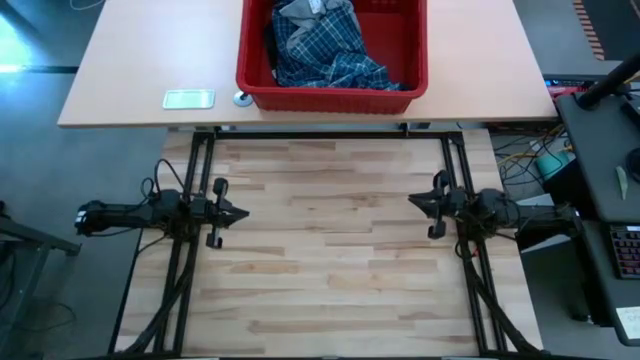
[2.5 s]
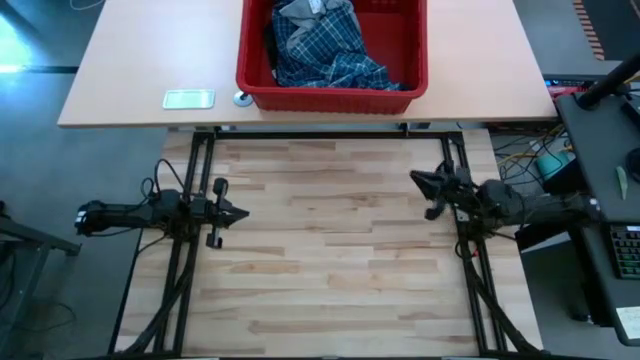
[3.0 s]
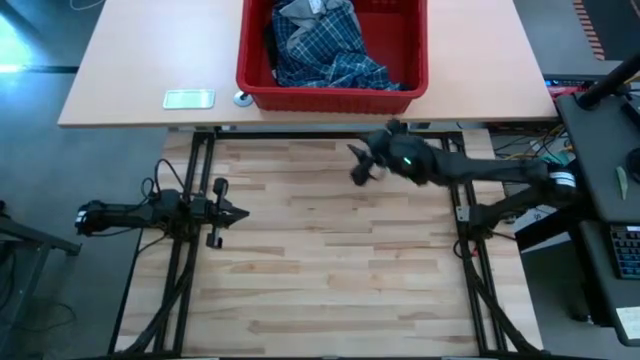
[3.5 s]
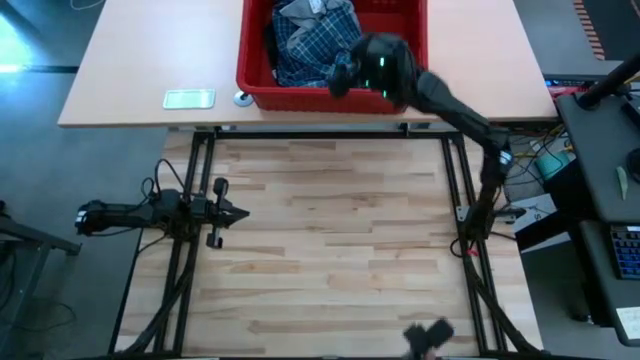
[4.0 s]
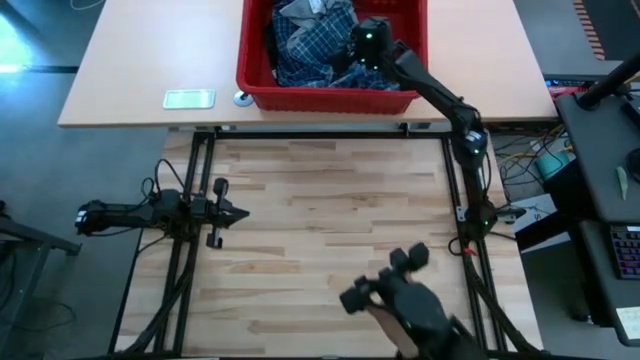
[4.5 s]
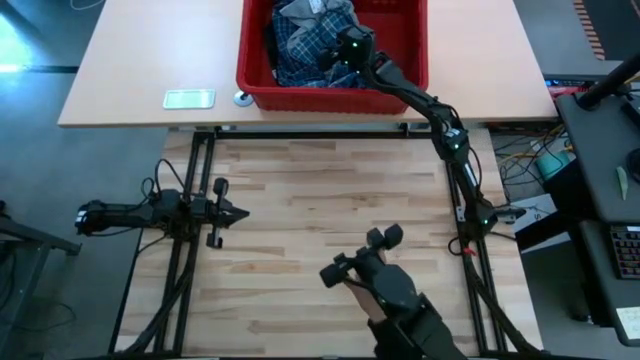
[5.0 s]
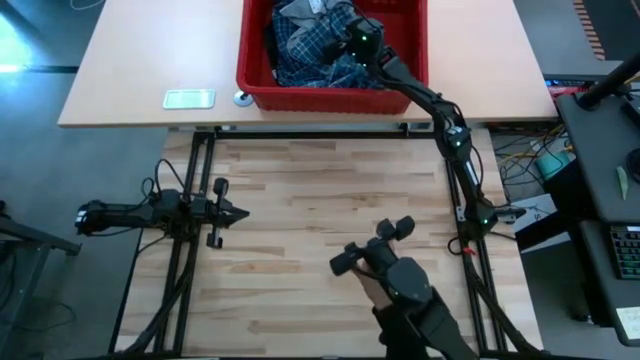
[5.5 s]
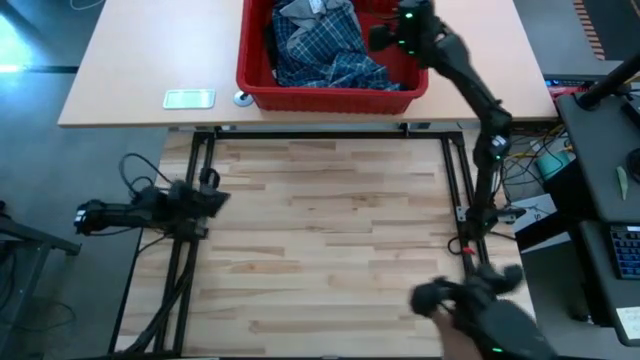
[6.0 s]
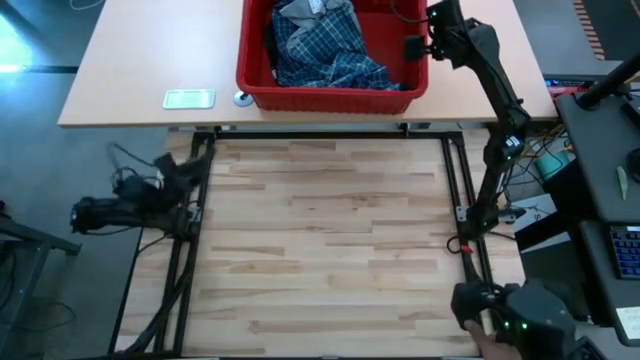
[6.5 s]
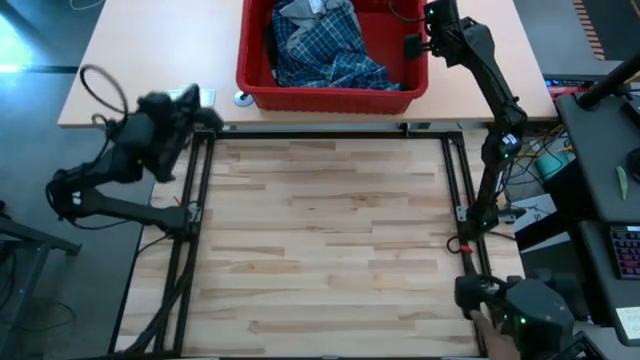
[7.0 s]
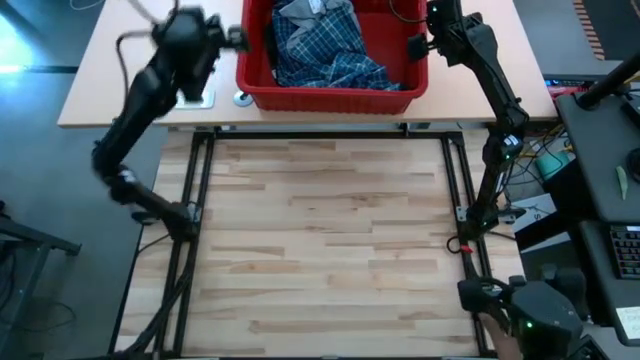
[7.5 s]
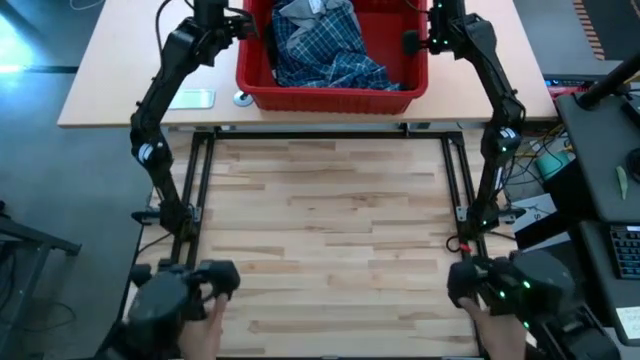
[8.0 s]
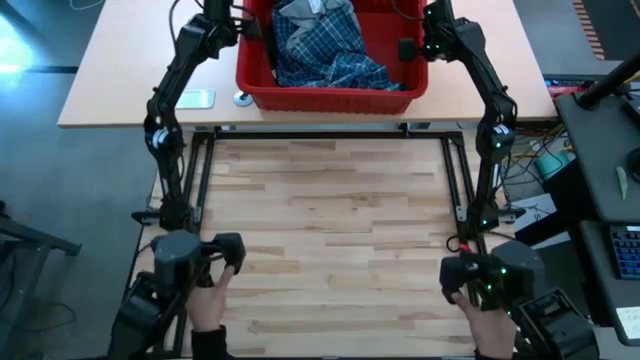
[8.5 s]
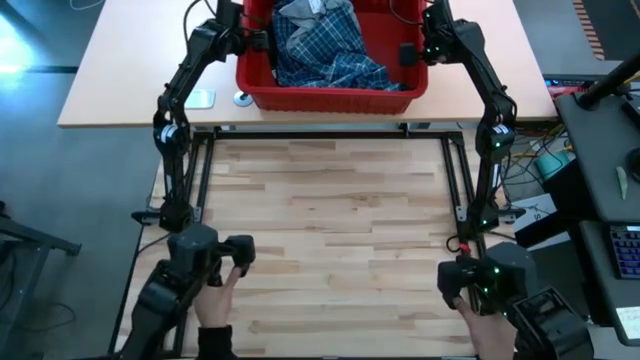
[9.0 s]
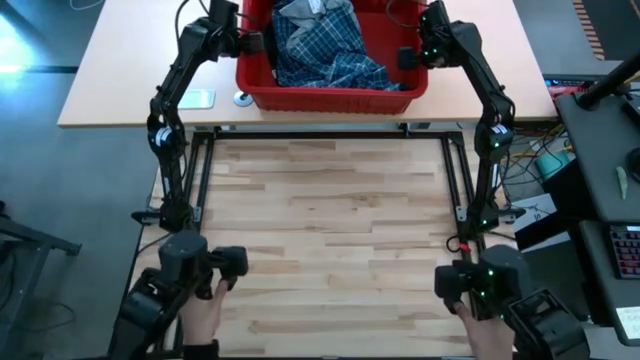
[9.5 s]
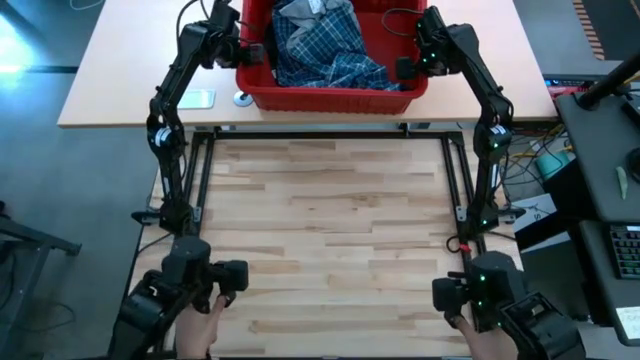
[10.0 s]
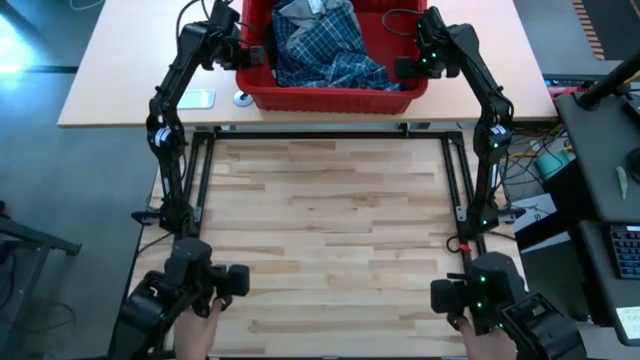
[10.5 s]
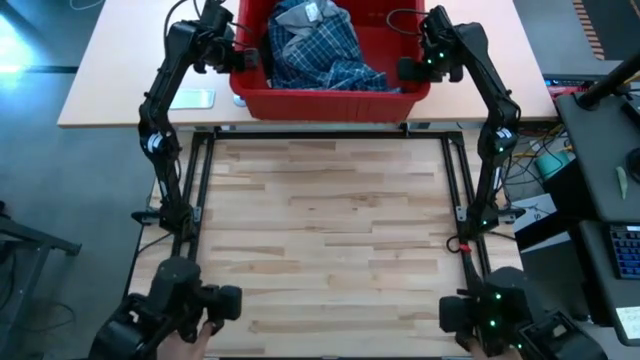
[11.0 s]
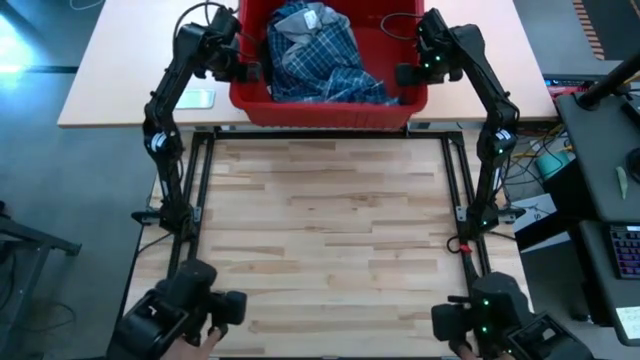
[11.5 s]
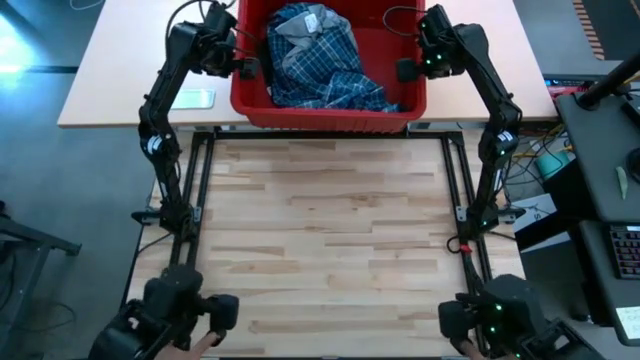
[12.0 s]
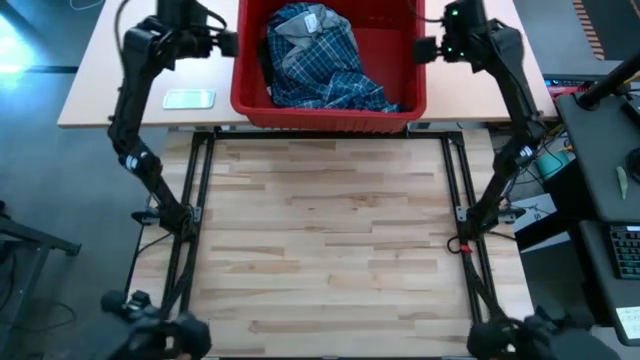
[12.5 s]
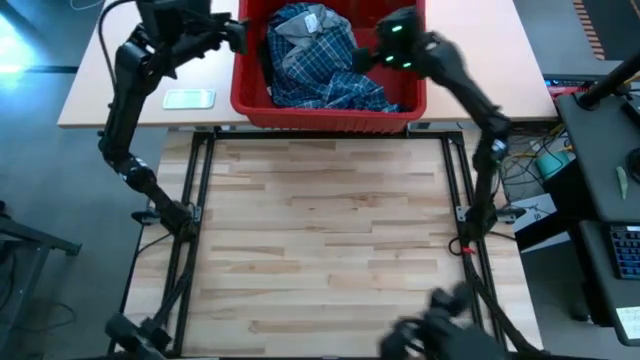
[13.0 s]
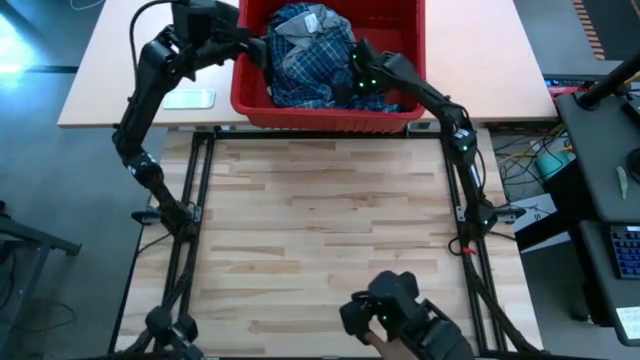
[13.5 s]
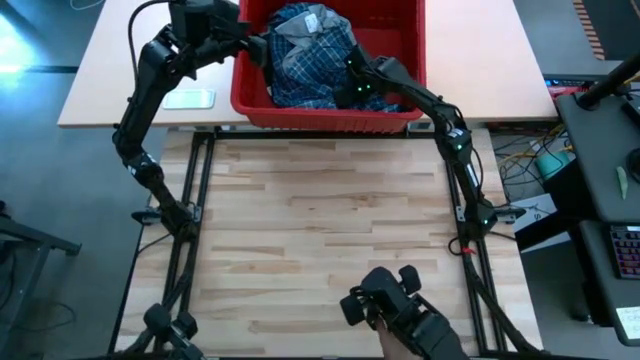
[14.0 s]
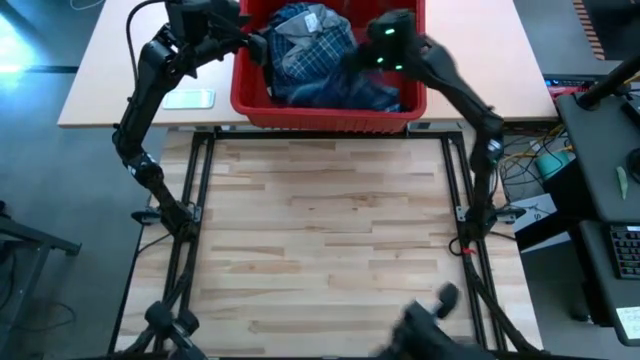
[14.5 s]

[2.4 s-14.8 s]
Task: Fold Laundry from Bin
Fold the blue patterned pants

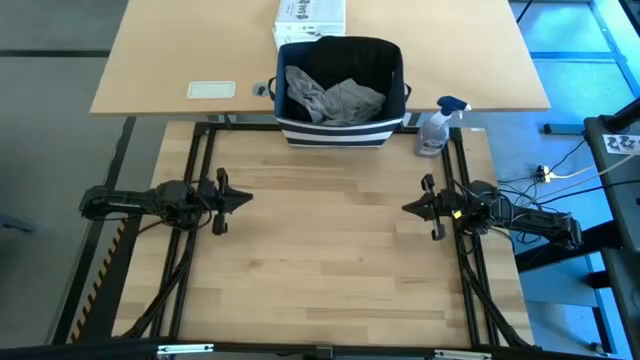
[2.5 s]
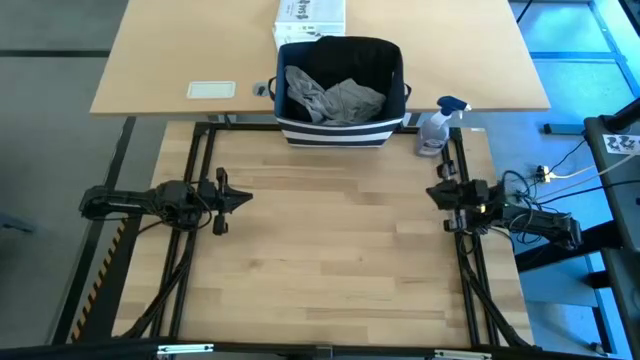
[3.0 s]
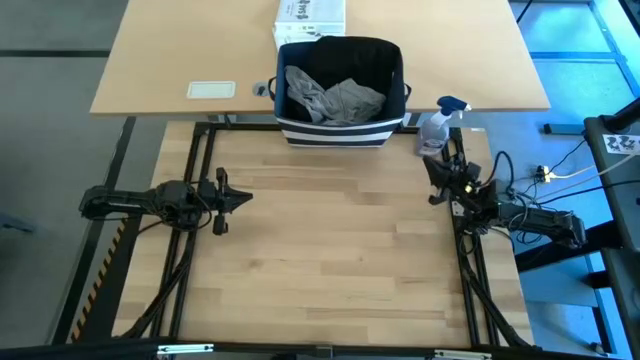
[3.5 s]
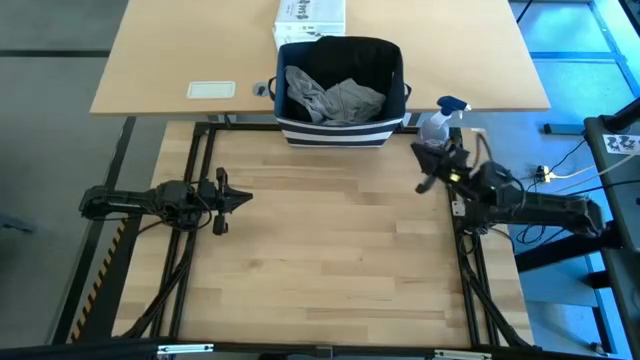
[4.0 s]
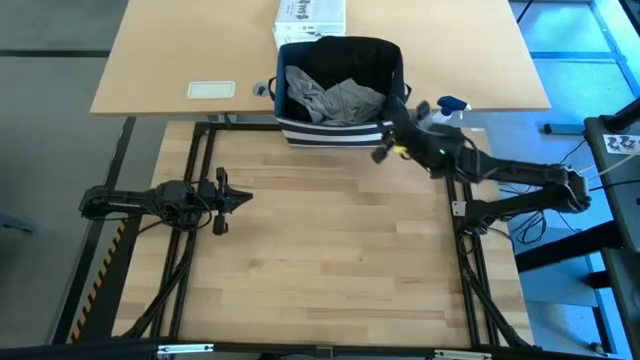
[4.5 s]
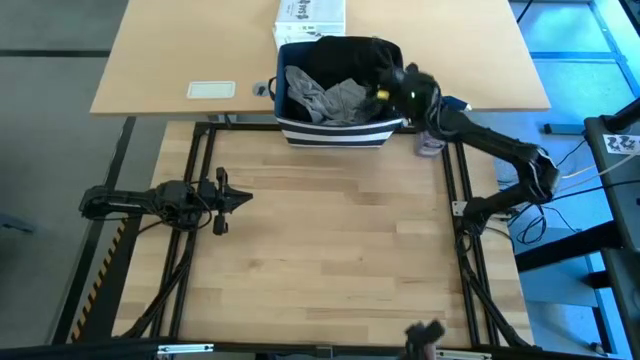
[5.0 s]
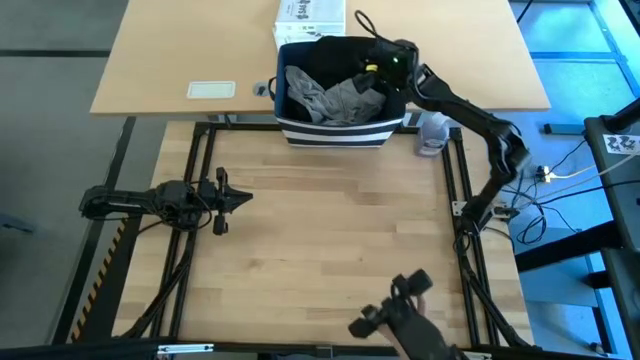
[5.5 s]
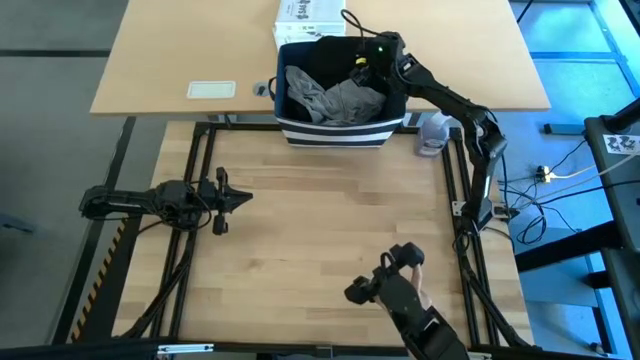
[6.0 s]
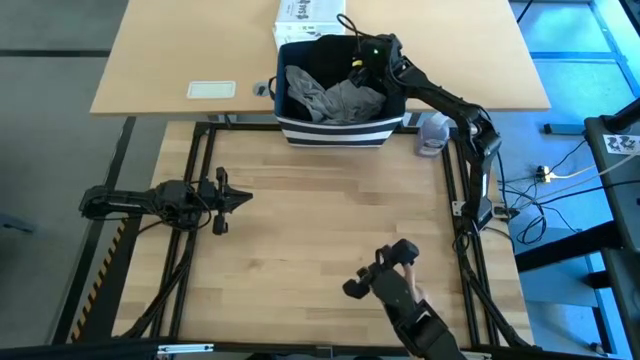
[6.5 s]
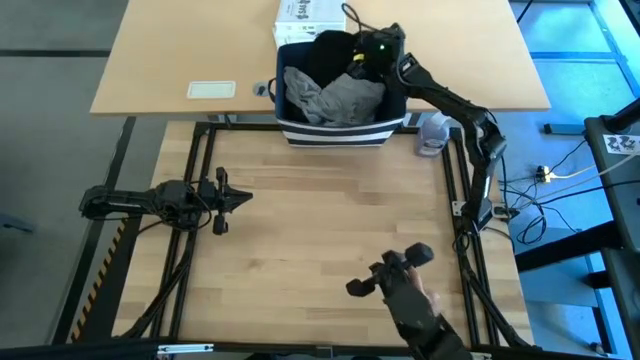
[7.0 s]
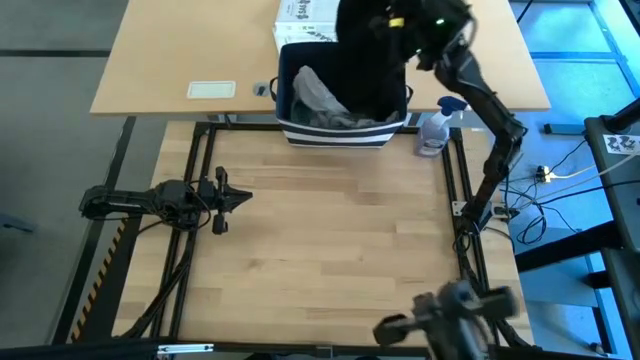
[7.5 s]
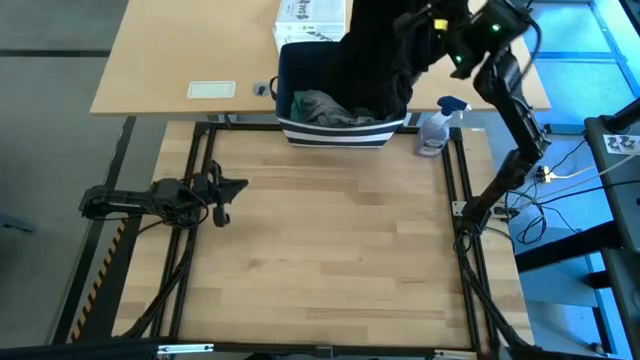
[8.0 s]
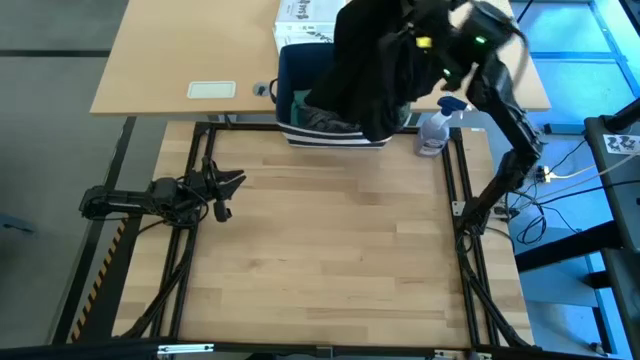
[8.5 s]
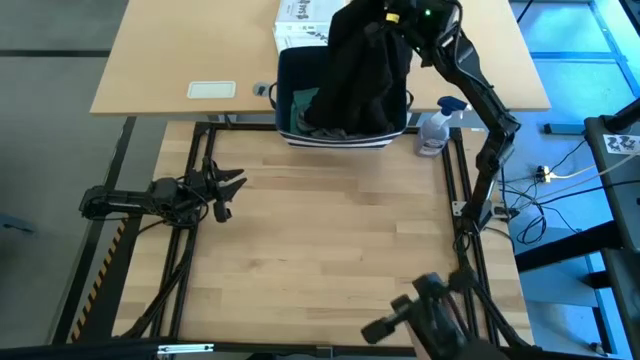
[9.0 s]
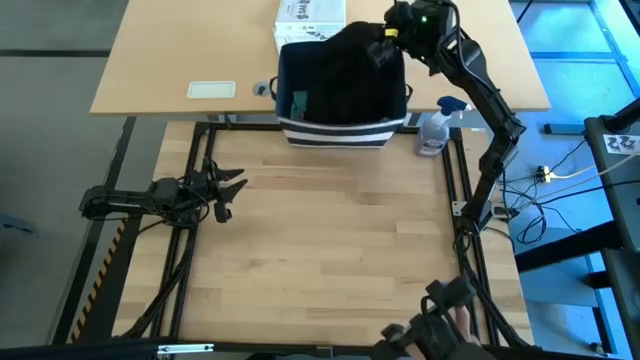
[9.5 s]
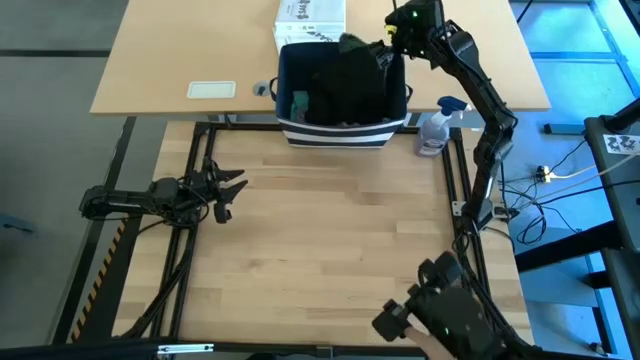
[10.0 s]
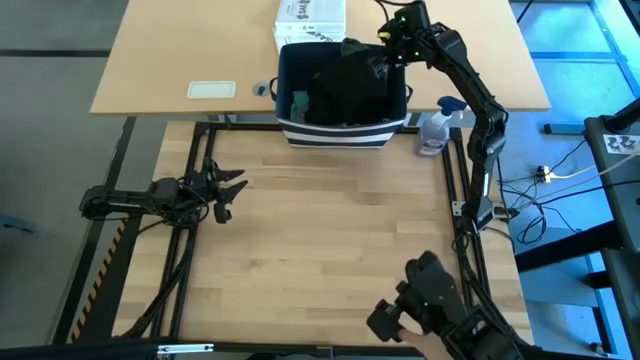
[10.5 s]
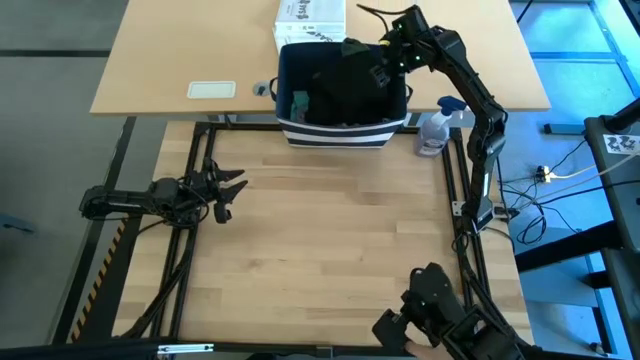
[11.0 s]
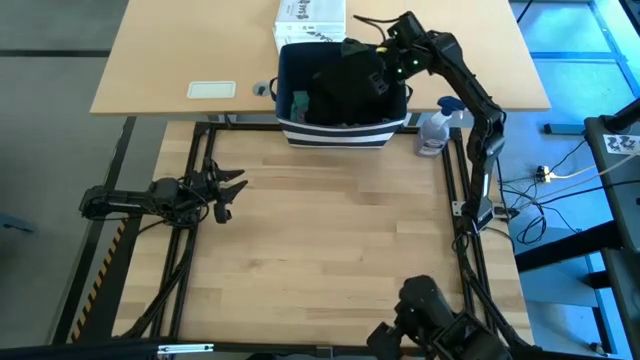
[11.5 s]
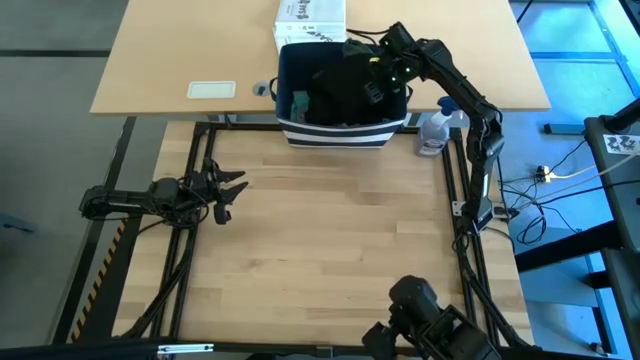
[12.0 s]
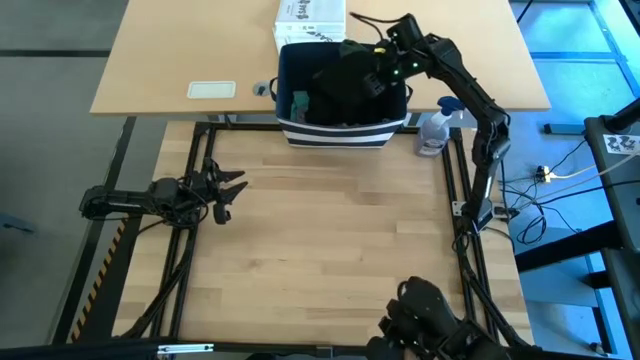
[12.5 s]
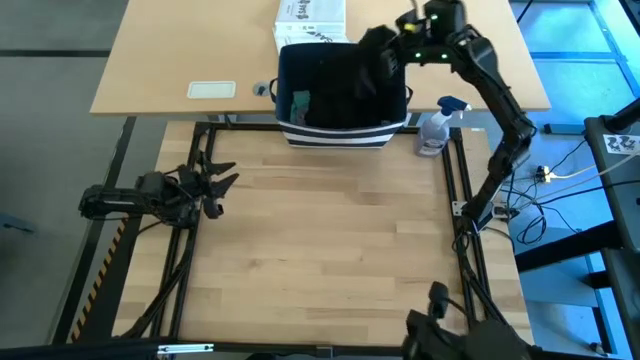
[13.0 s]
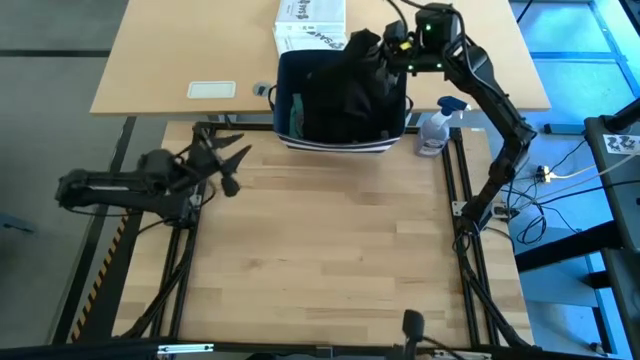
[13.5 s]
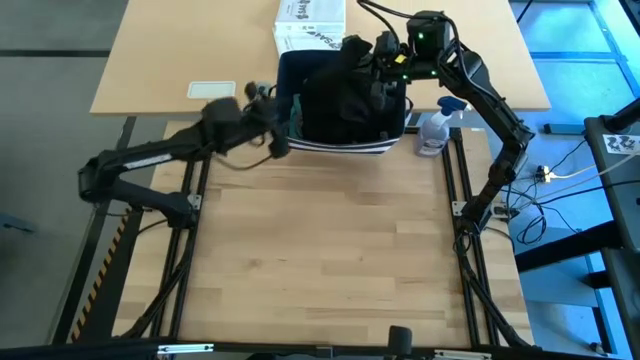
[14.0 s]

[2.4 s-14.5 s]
Task: Fold Laundry from Bin
Remove the black shirt from the blue bin
